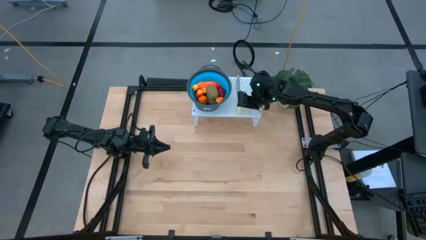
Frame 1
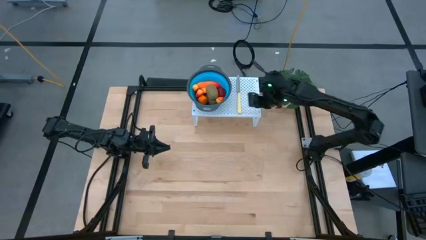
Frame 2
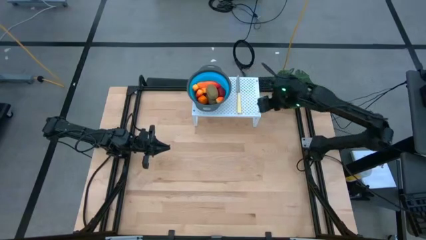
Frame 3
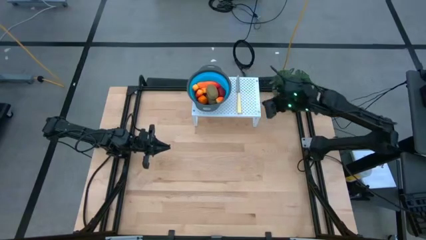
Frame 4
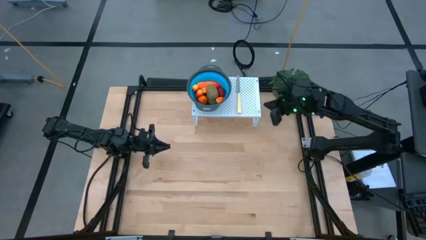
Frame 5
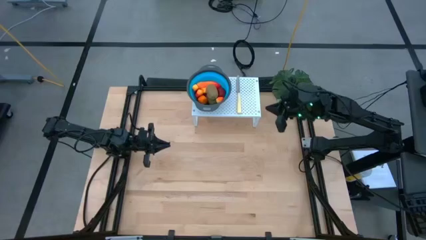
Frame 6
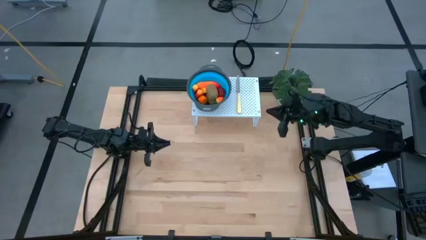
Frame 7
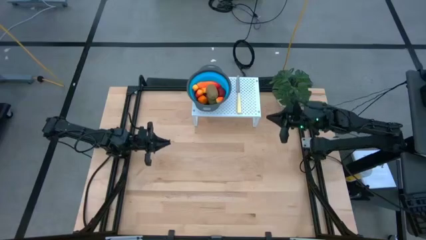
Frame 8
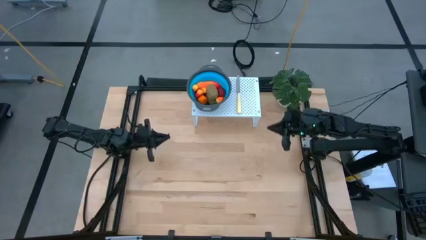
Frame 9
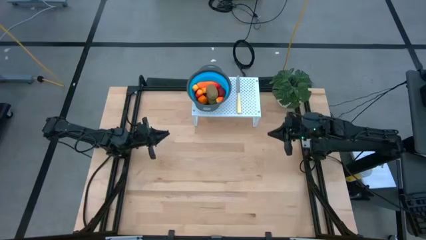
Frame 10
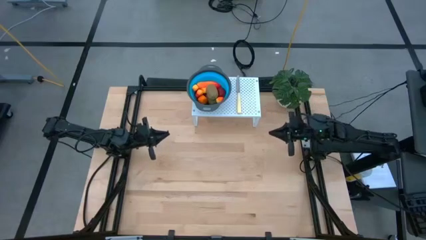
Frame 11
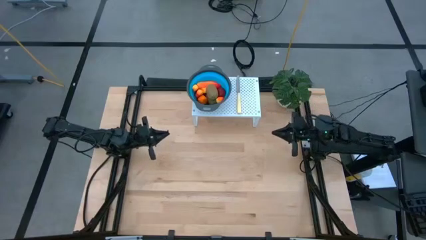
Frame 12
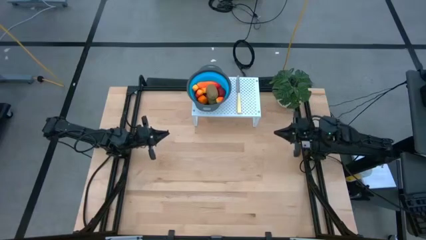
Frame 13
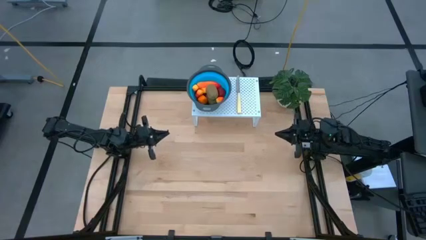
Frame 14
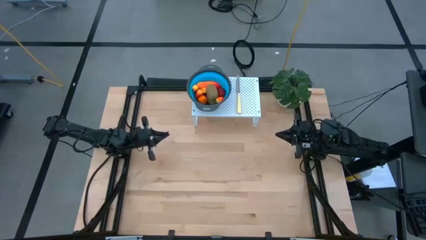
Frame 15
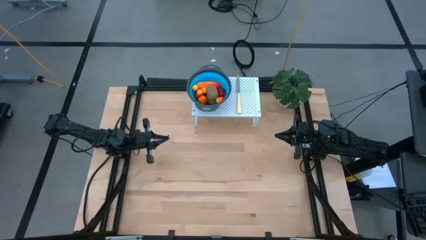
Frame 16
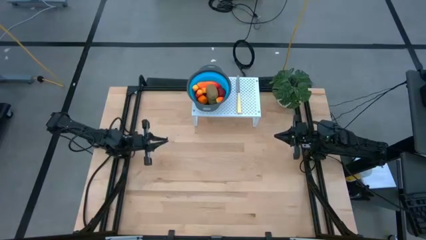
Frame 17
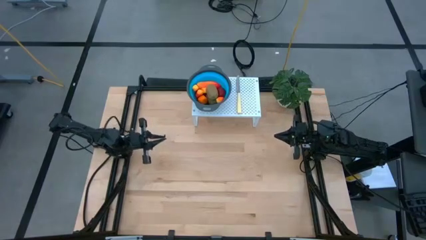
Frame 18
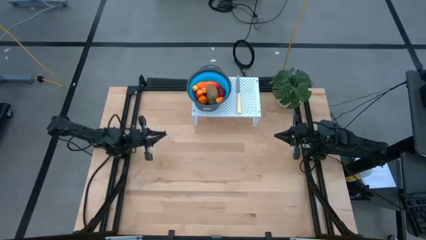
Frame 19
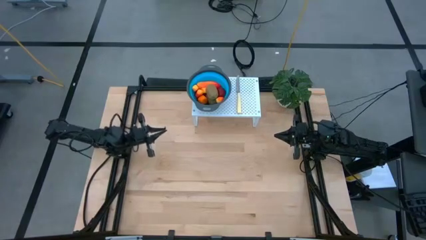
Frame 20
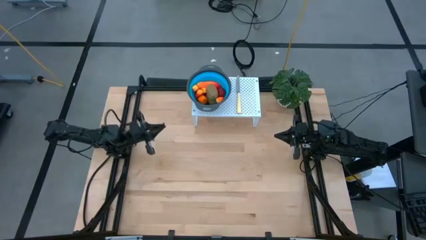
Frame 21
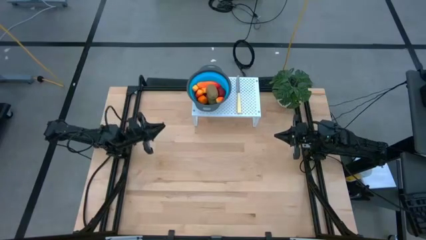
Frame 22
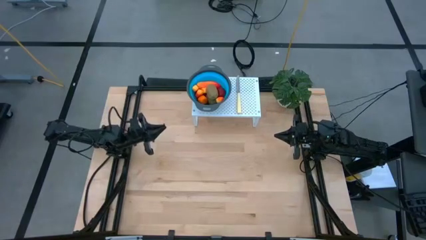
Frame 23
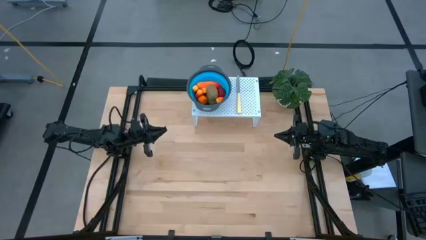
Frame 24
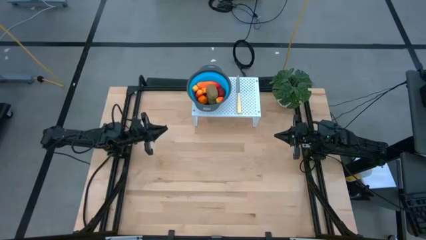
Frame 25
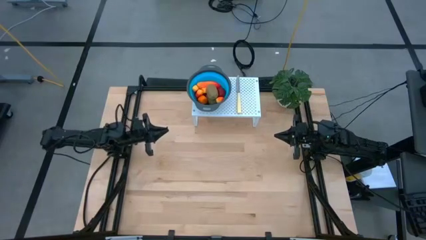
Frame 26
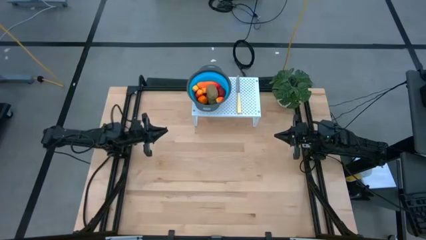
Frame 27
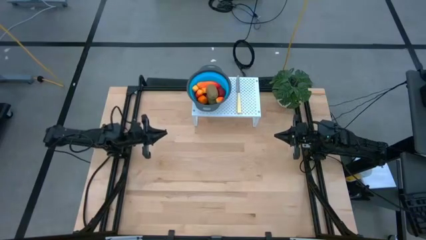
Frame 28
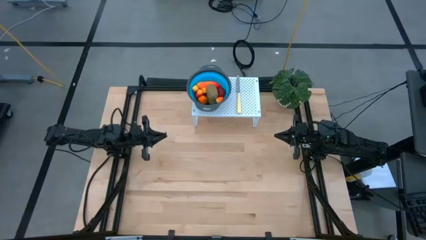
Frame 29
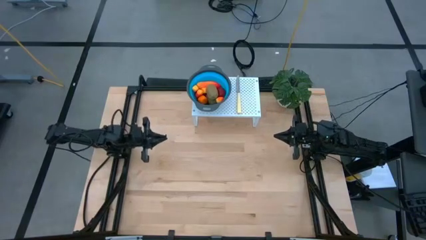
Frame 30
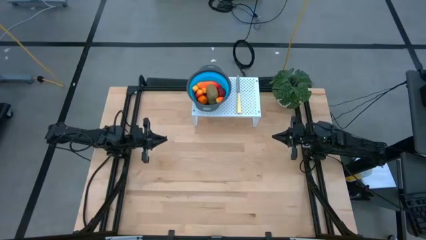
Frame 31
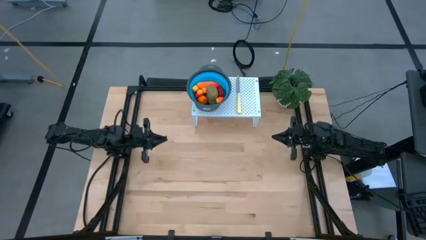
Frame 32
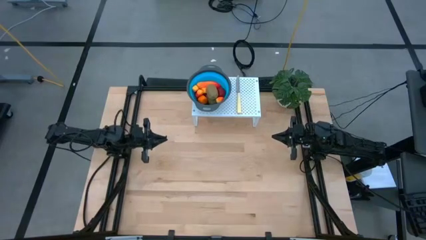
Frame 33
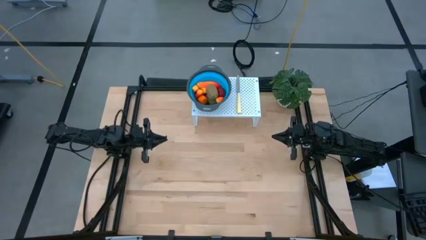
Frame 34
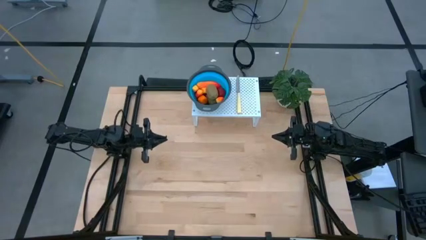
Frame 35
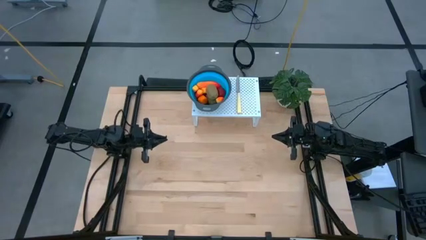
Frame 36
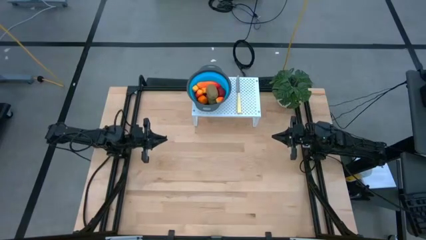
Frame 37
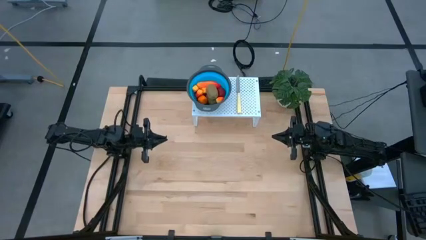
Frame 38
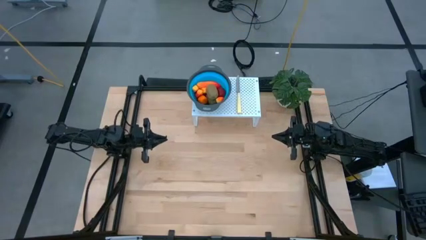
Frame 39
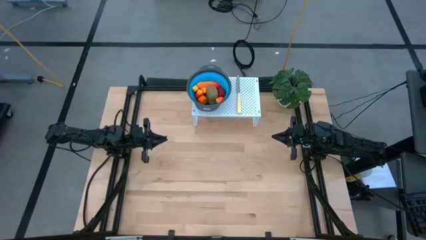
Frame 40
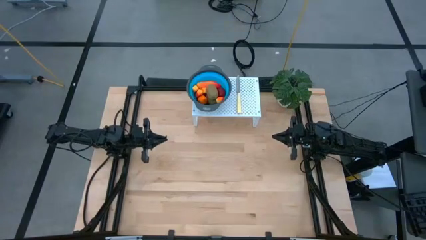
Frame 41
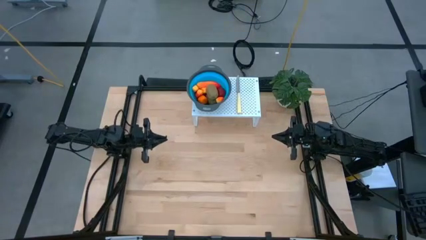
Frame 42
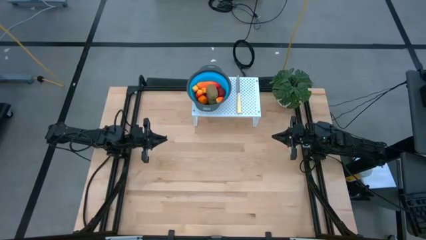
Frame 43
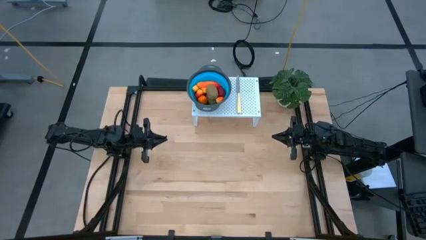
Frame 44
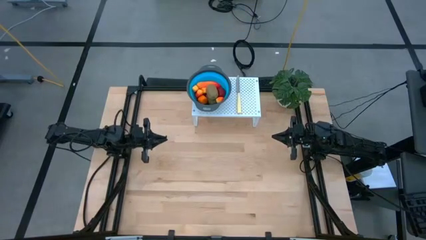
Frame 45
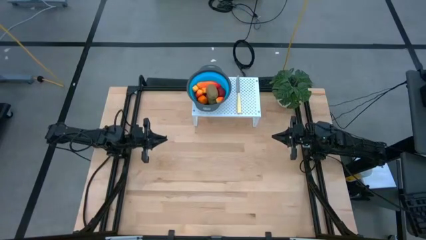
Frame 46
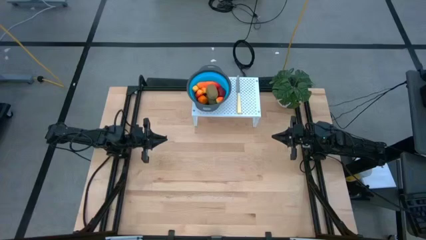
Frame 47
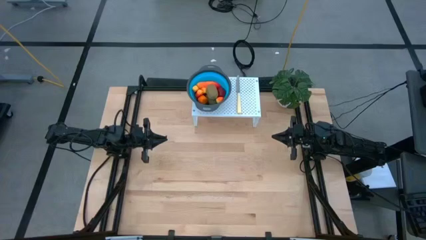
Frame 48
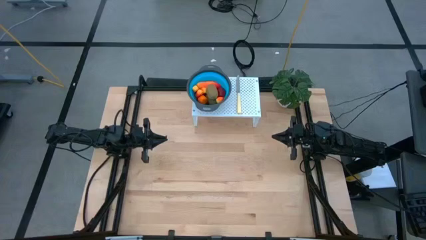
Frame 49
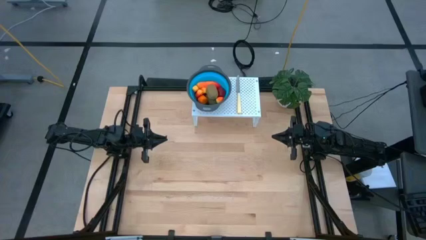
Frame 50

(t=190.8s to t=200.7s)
Task: Pick & Place Fruit
Return to Home Position

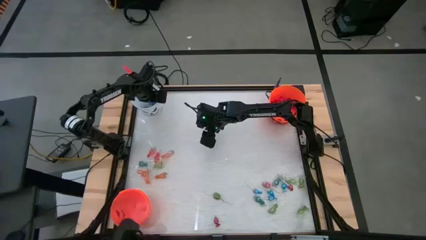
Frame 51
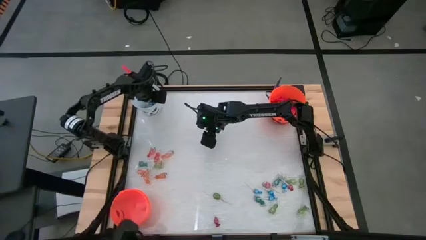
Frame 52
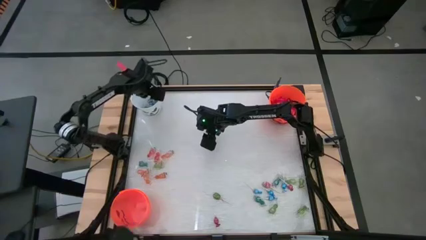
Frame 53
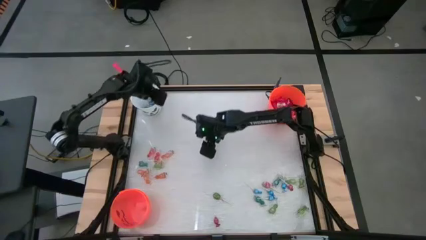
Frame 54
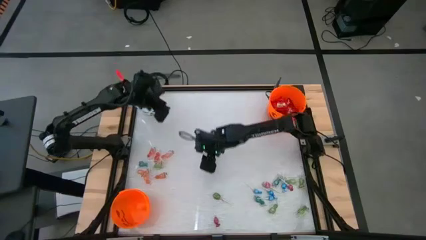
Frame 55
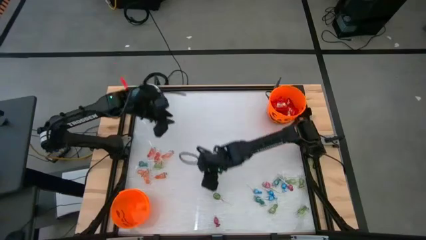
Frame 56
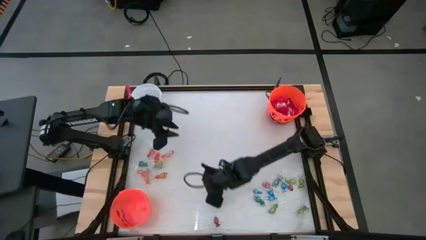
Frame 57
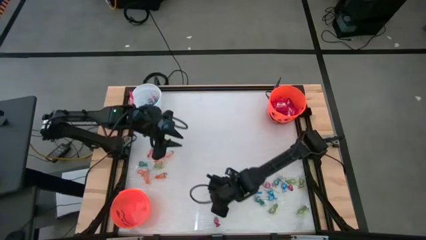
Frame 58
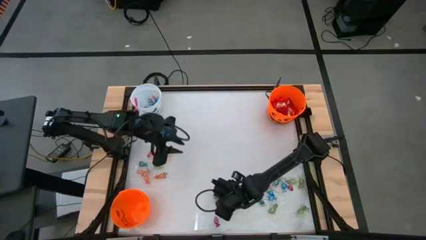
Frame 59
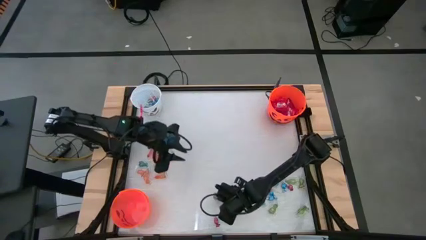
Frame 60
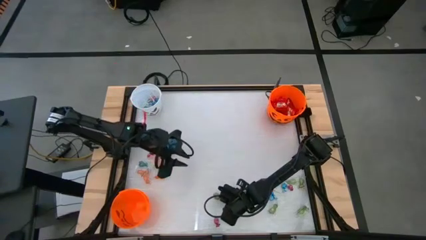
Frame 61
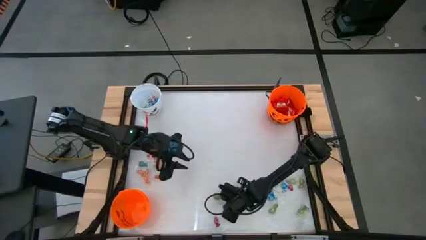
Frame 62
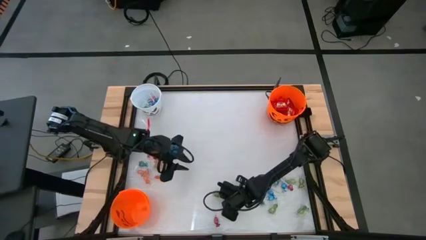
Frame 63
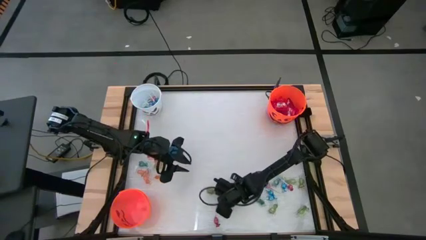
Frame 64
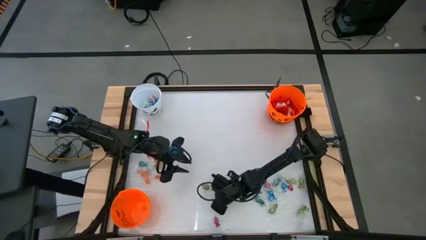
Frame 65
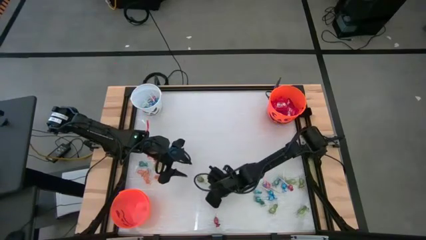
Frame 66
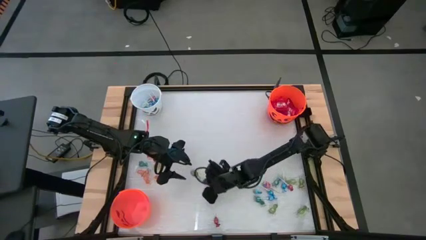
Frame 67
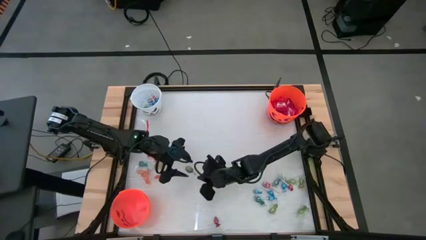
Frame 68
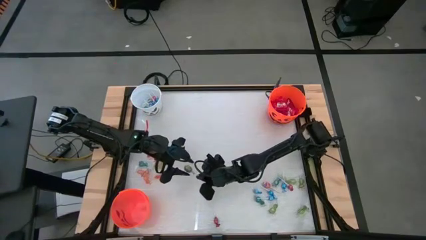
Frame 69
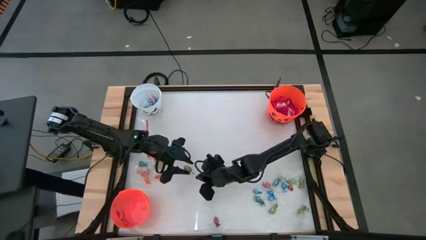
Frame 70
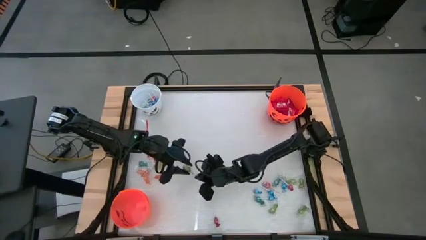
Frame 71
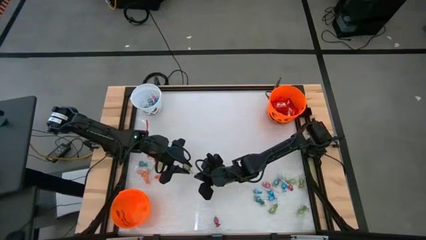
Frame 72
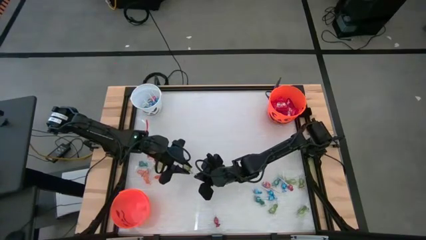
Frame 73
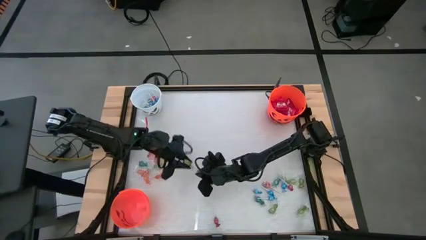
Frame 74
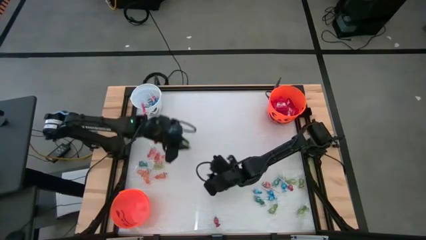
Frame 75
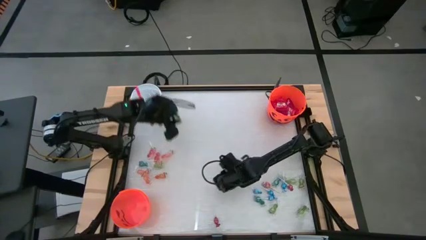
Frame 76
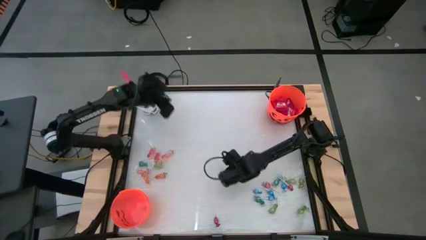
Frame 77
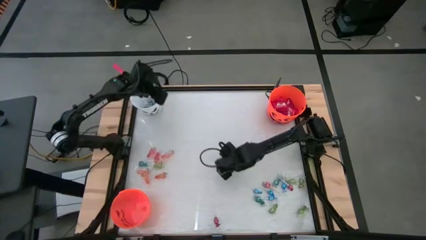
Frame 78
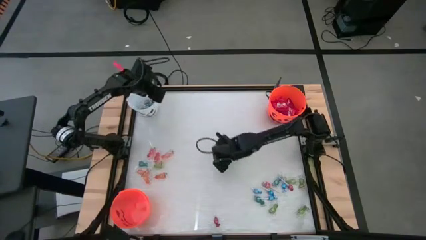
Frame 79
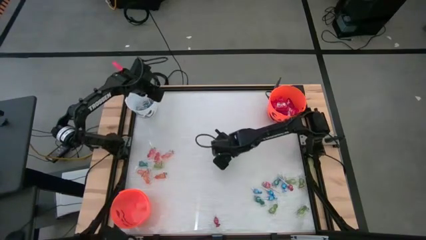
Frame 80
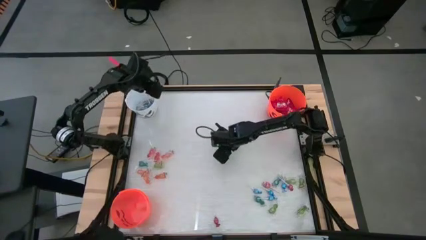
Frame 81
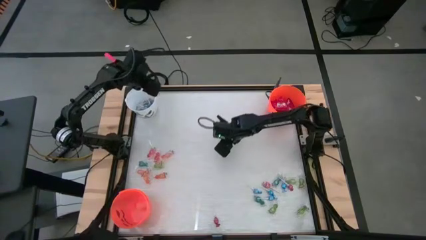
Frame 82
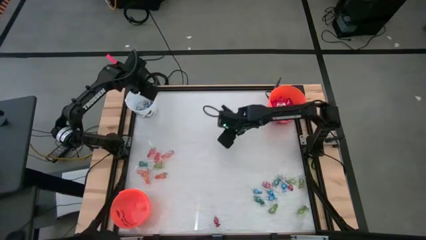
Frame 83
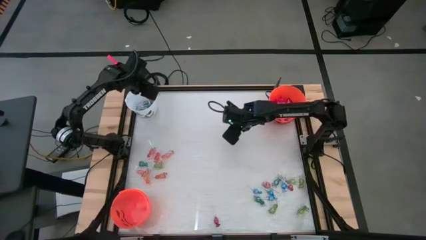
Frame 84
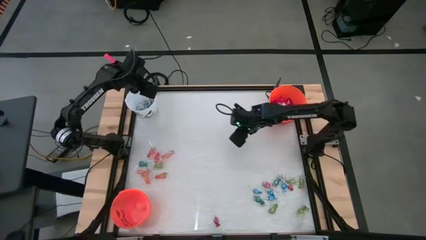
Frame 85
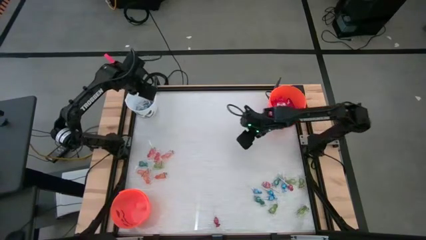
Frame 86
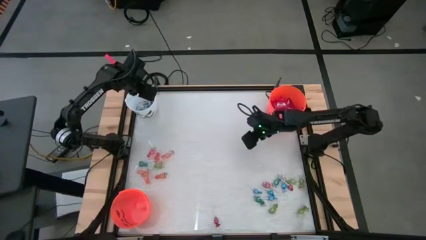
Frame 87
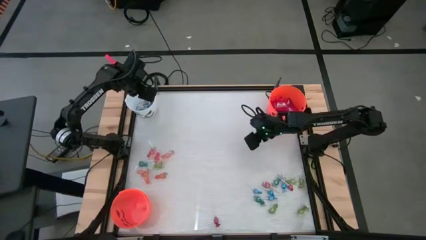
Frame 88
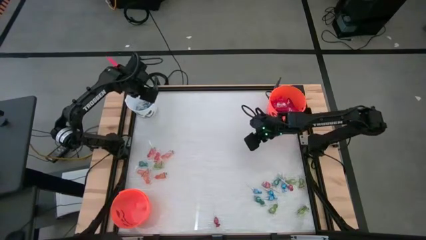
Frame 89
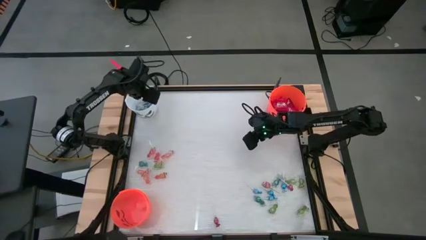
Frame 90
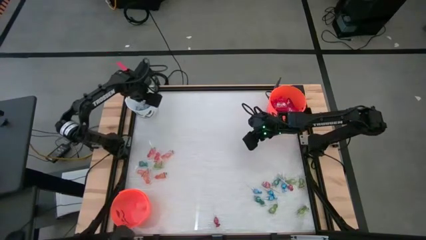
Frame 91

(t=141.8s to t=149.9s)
Task: Sort candy by brand, put in halloween buckets
Put the green lollipop into the white bucket
